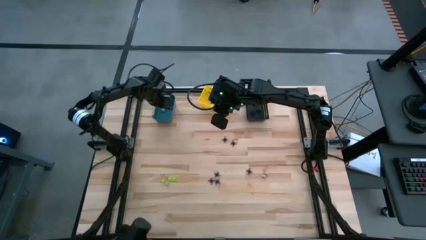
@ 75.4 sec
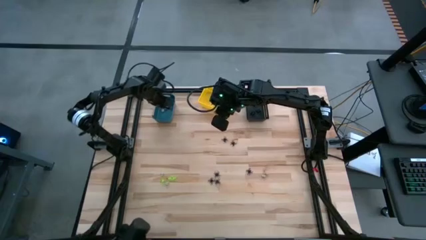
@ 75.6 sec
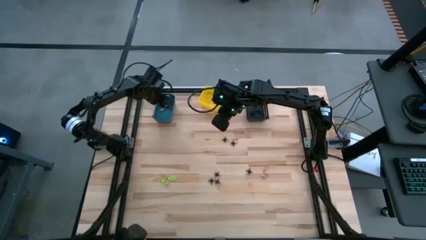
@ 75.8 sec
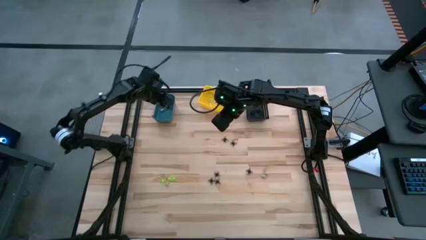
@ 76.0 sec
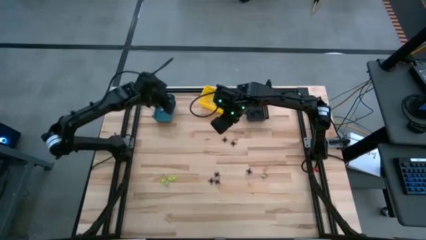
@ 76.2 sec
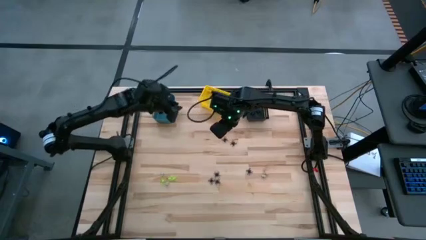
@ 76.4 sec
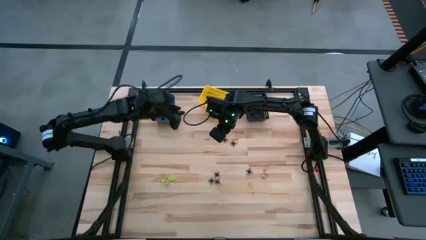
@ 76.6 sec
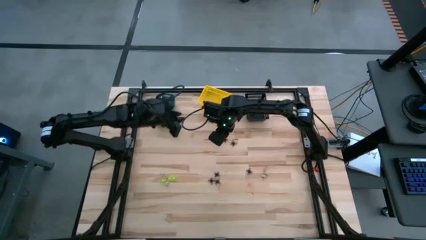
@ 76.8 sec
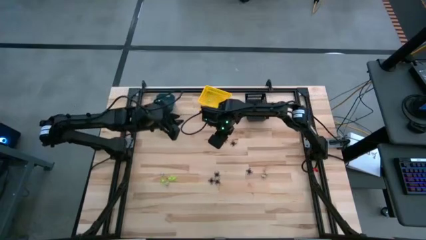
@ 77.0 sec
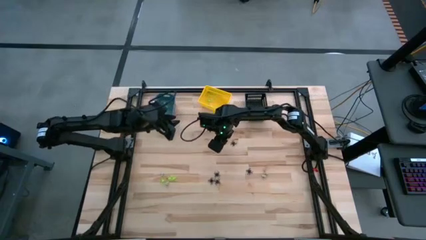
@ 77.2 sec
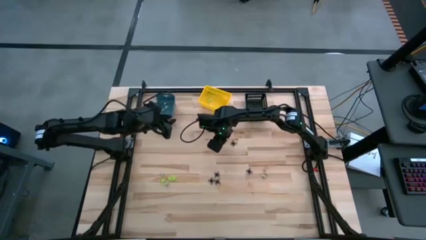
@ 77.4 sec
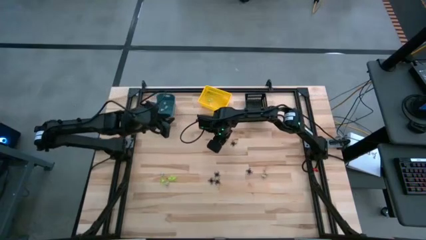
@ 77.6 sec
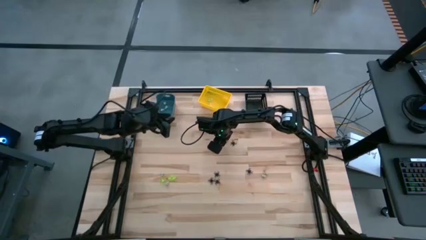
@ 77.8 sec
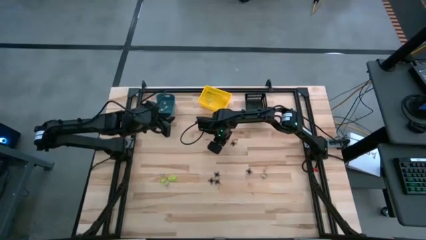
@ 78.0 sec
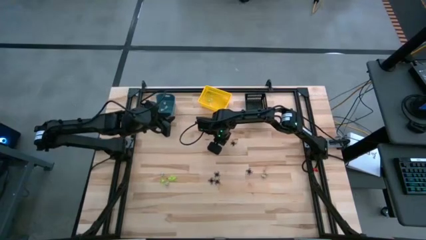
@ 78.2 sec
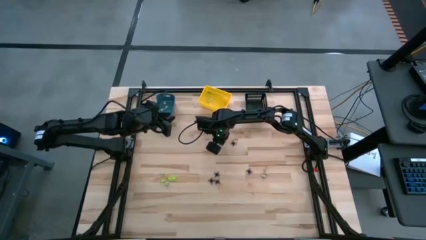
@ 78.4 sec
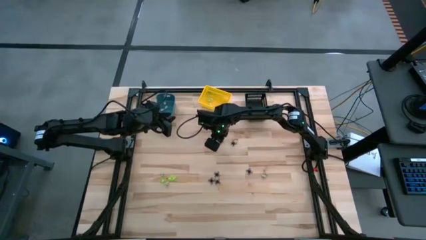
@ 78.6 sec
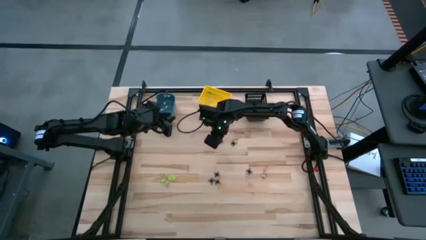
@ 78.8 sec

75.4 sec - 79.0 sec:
Task: Sort Halloween decoration
Put the black spider toy into the black bin

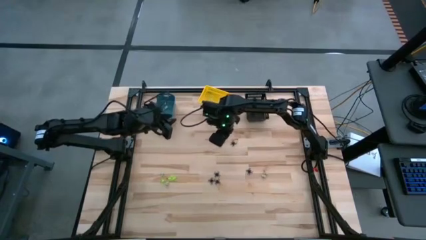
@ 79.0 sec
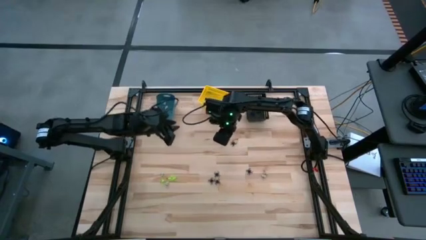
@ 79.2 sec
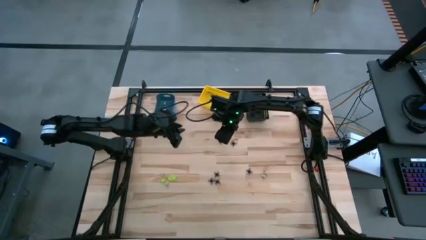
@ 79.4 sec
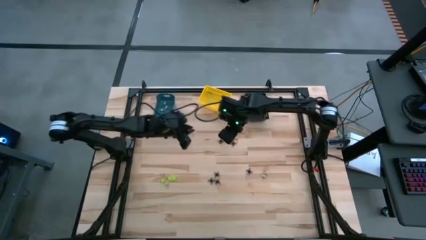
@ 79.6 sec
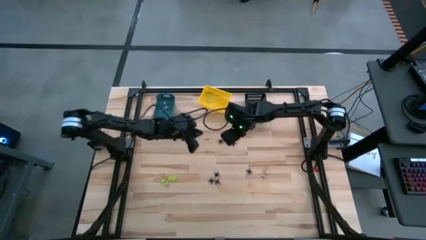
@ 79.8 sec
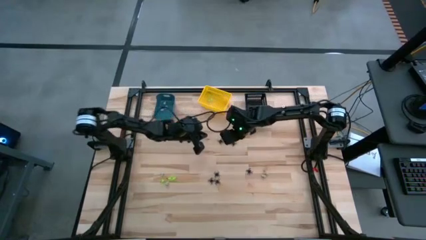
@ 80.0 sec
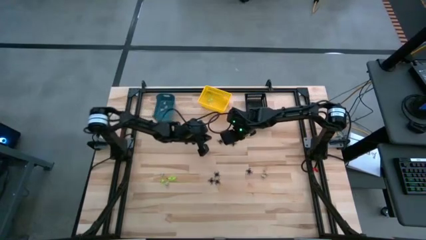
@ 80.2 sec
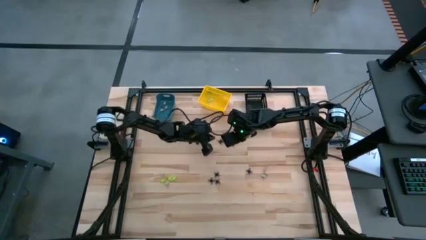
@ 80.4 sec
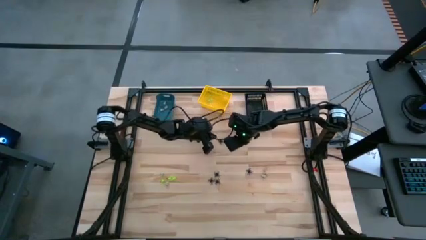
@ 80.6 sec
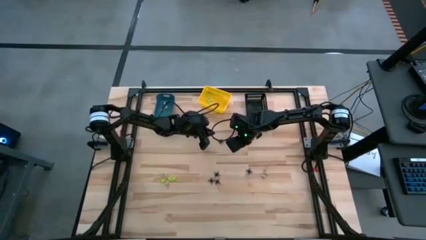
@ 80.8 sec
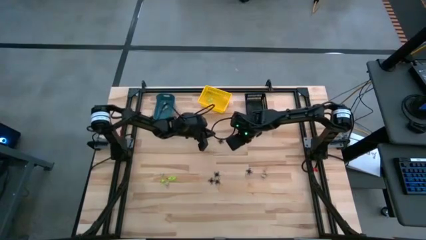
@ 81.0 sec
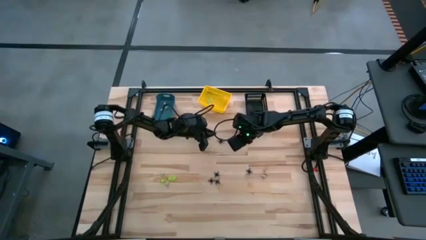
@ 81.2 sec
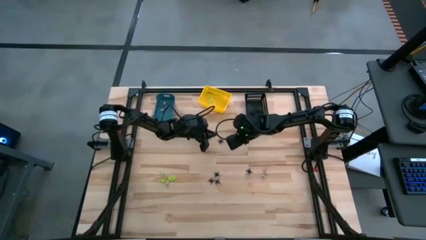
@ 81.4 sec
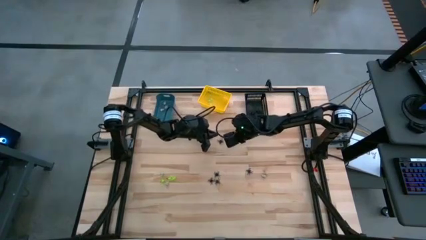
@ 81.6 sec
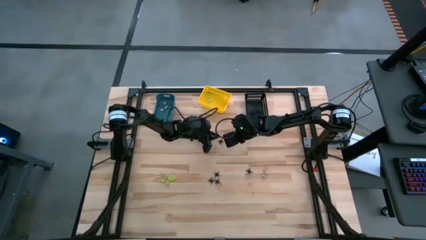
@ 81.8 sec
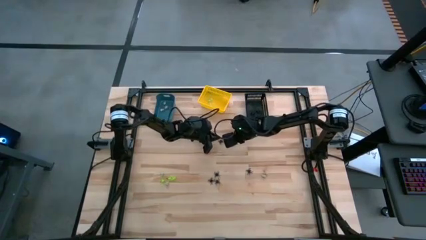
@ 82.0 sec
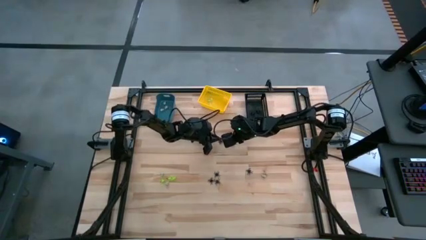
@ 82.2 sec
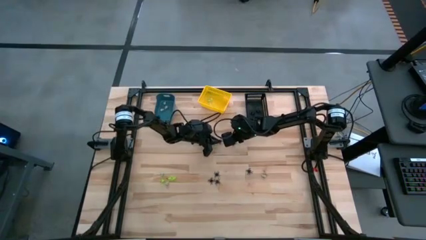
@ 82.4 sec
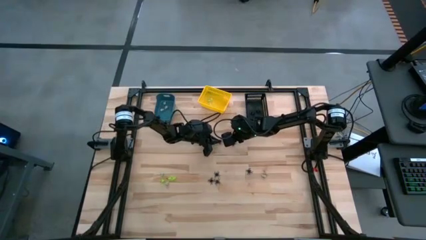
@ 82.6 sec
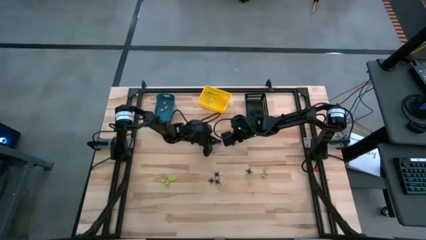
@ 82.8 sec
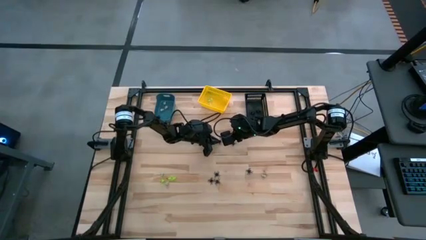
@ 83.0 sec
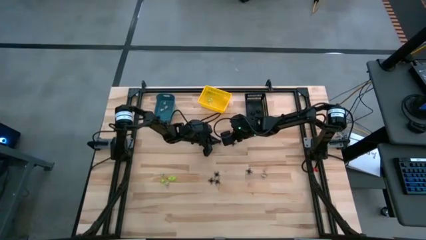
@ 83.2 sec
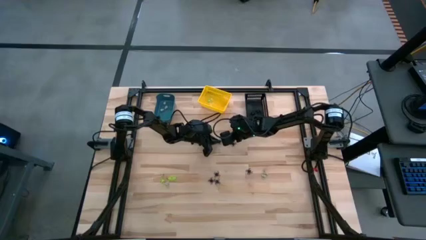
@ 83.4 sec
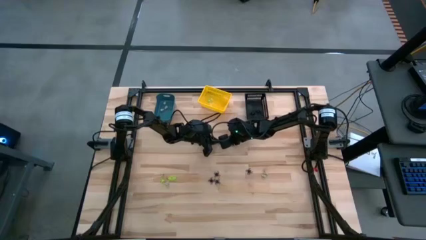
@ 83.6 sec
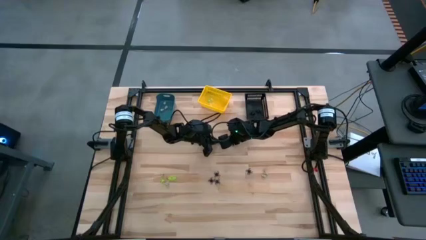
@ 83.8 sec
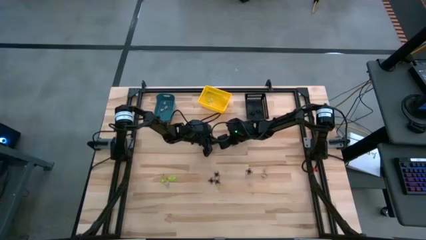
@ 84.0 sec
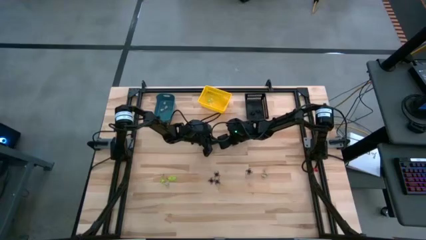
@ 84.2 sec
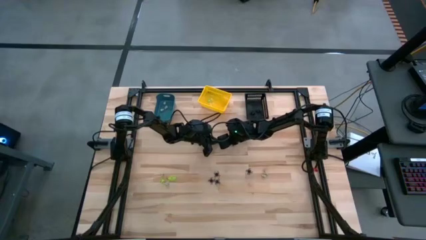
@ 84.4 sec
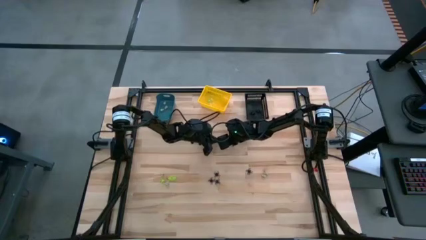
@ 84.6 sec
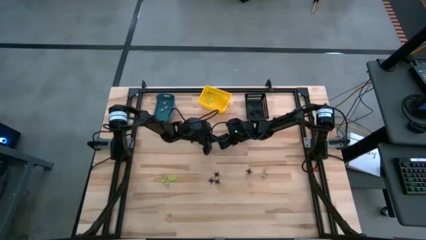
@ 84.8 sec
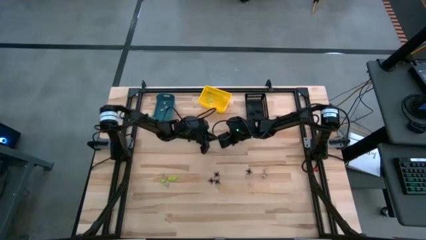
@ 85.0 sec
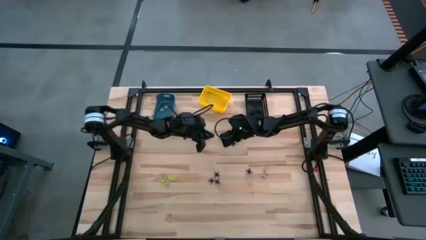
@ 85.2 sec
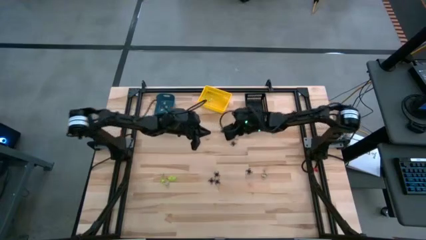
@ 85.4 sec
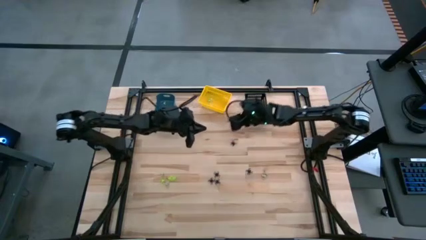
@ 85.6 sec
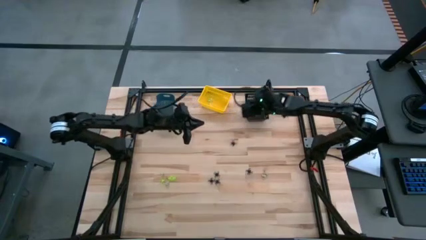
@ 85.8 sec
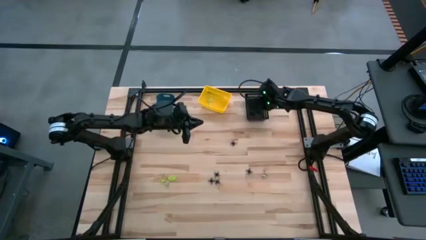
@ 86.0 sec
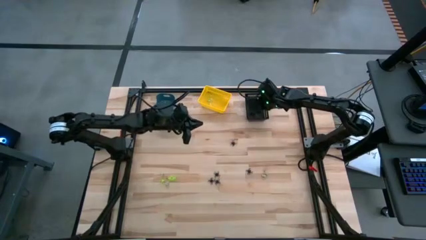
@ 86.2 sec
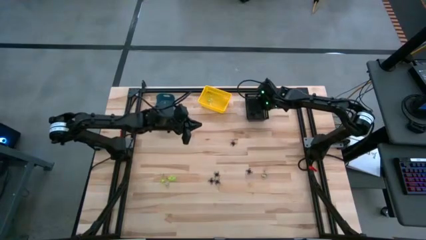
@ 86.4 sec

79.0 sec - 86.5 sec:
Put the black spider toy into the black bin

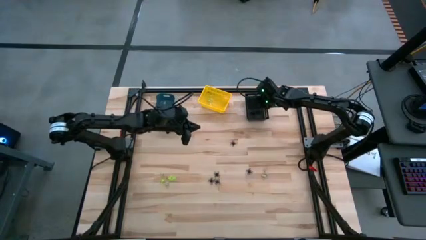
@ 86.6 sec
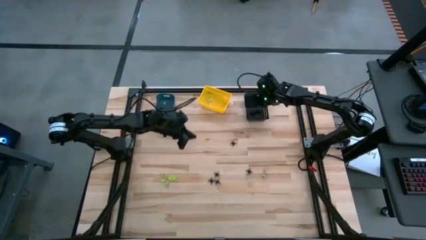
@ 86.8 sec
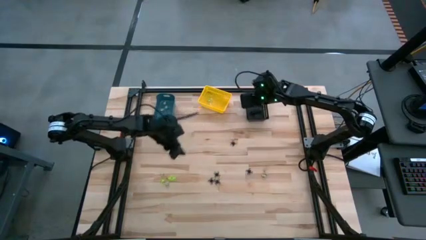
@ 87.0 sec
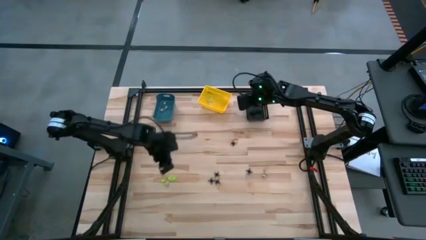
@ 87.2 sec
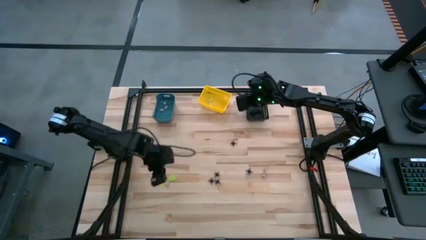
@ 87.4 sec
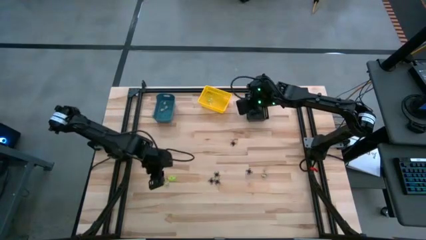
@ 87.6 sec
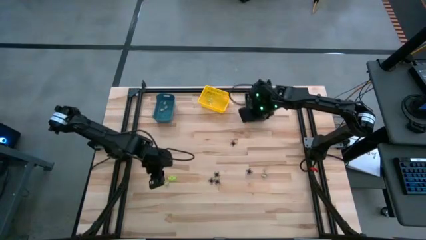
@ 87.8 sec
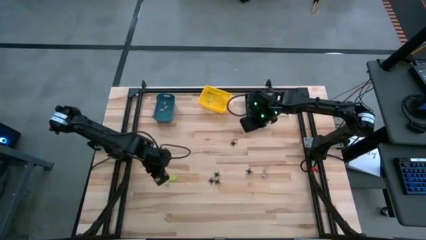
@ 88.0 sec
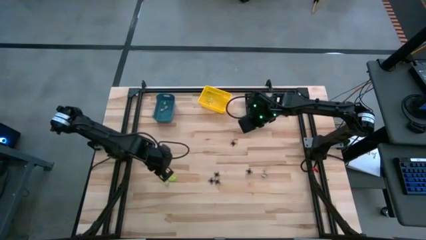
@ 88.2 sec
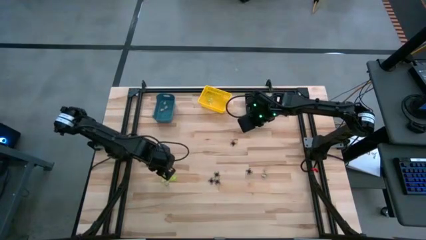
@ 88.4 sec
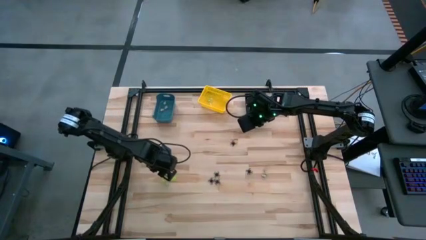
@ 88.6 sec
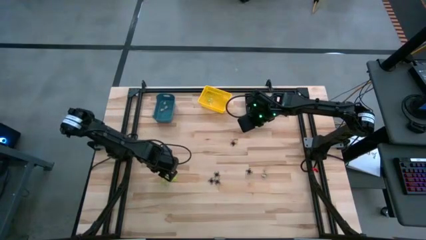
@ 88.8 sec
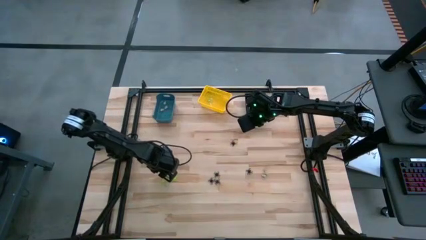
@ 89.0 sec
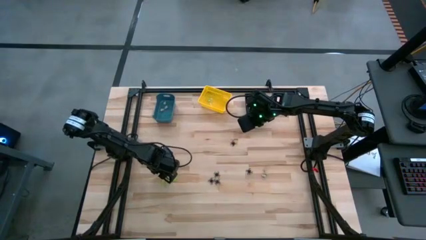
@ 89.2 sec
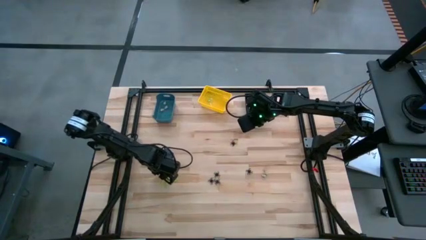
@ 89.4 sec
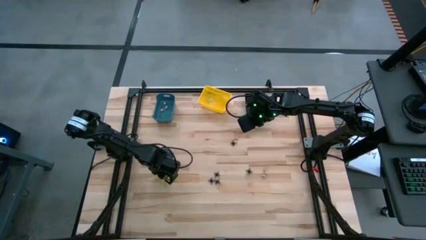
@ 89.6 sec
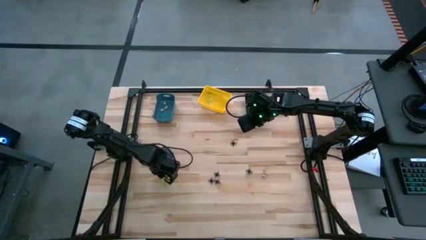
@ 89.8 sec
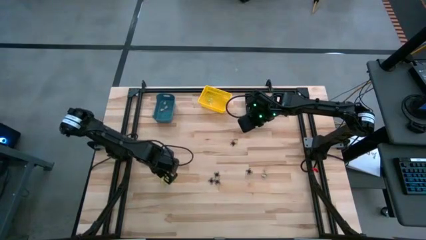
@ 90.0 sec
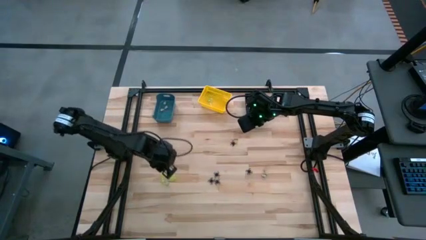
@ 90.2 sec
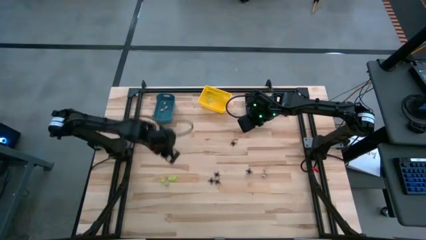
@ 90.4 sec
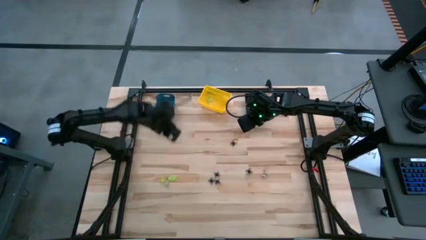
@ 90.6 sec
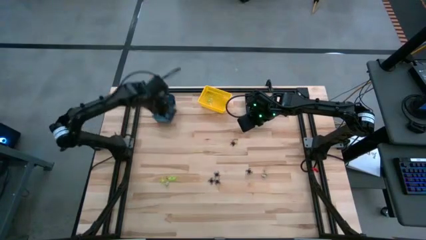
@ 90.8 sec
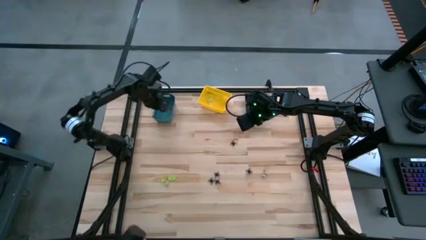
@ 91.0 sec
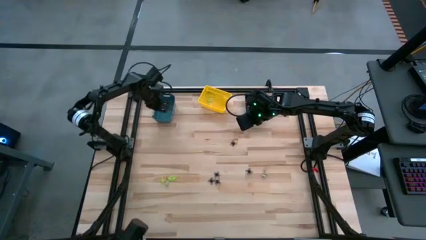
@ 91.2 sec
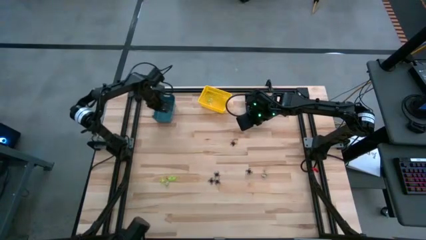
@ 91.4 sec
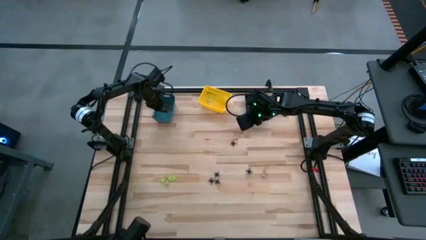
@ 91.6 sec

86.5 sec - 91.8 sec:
Put the gray skull toy into the blue bin
